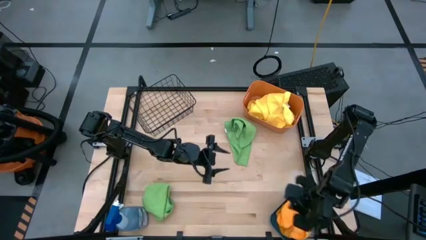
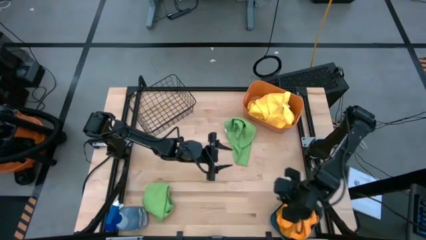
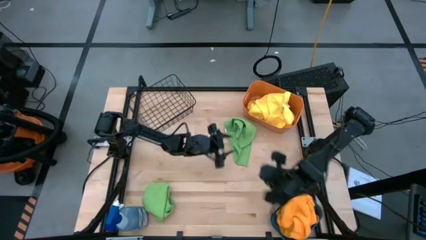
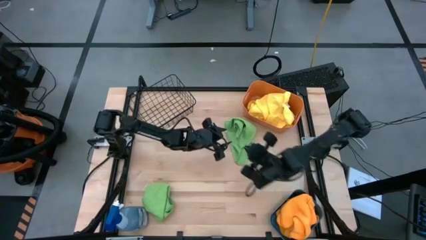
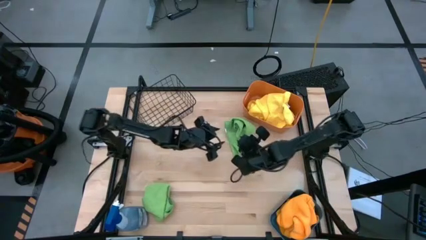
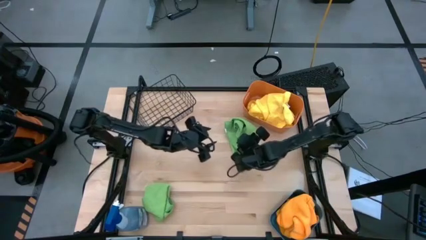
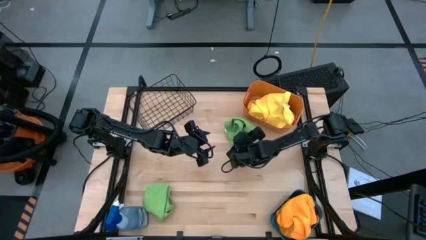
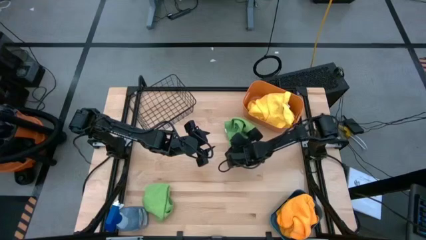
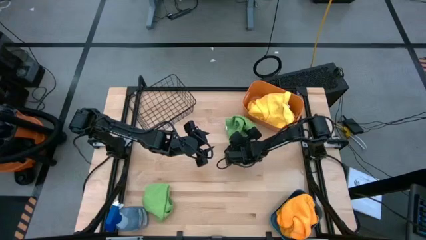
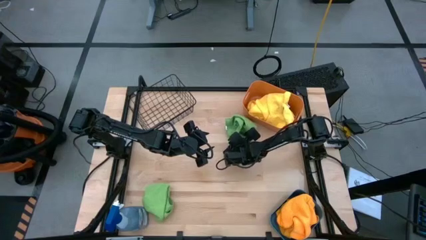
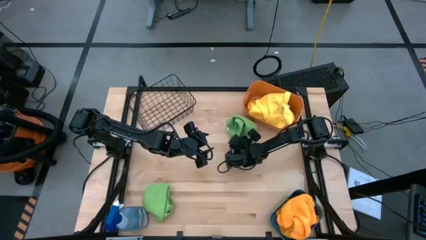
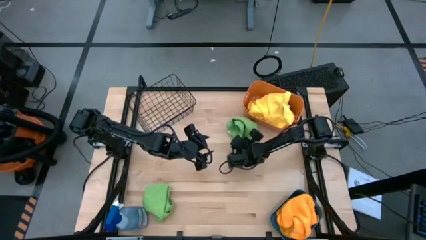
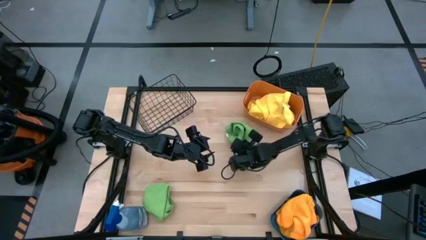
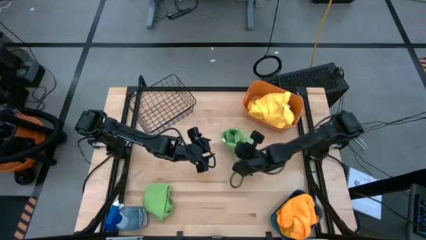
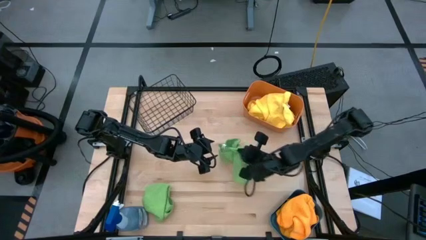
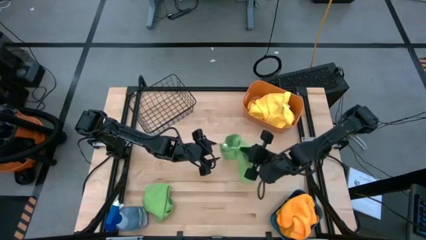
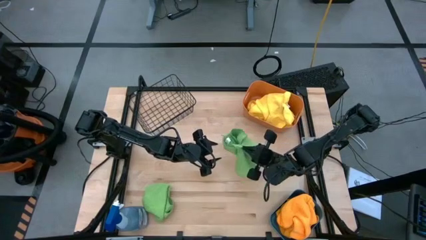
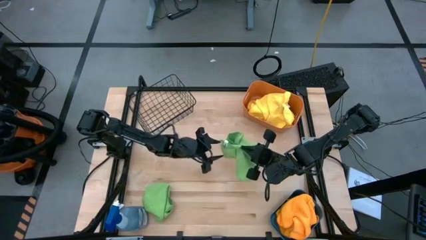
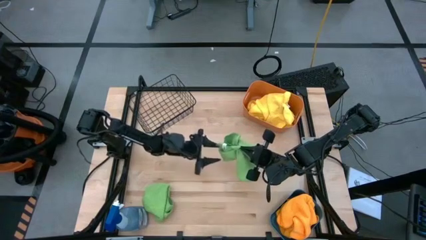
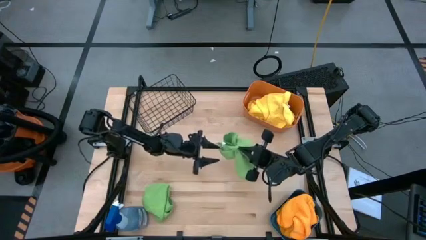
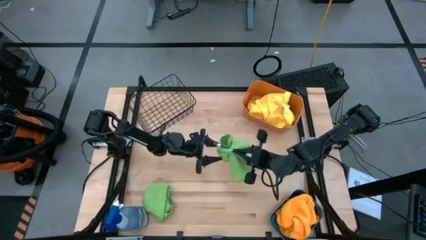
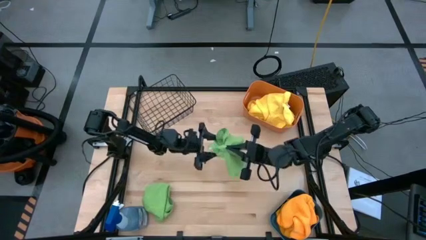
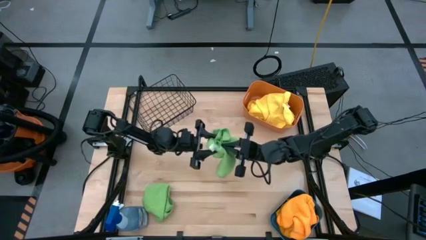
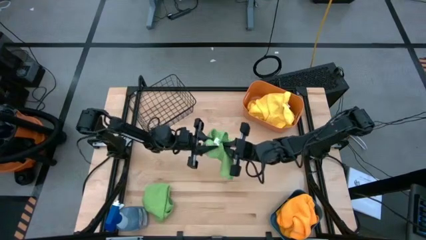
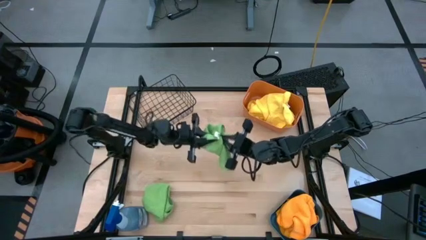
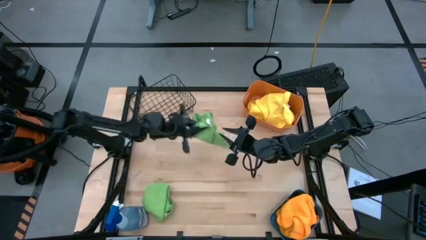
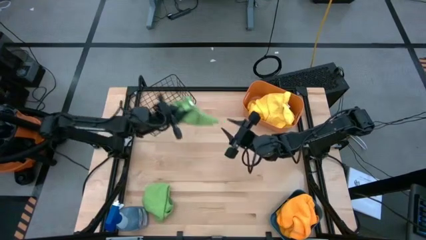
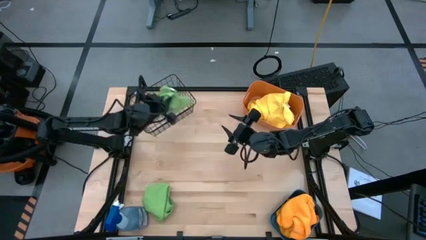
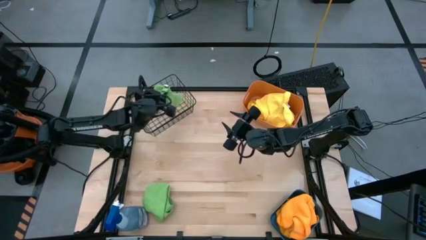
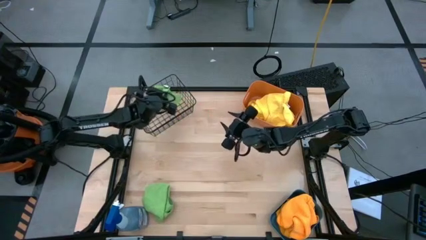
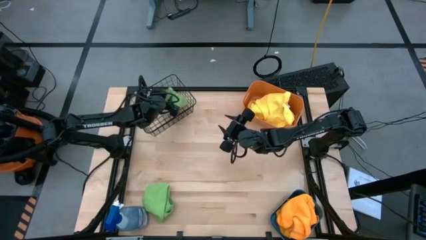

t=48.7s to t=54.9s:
Task: Sort microfiber towel by color & place in baskets
Put the top green microfiber cloth into the black wire basket

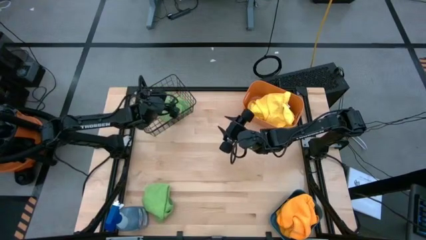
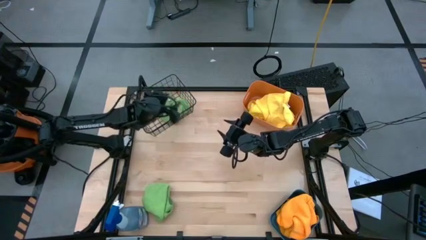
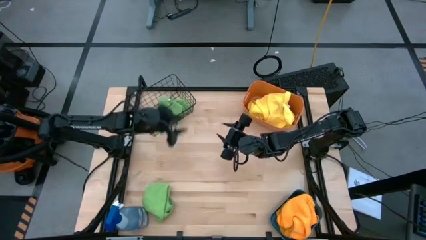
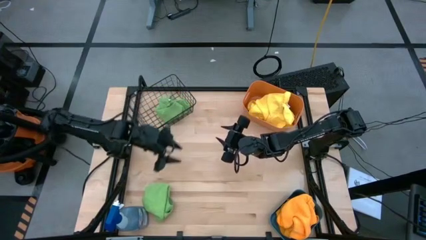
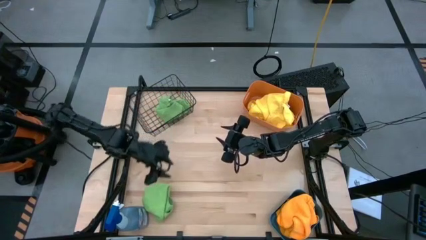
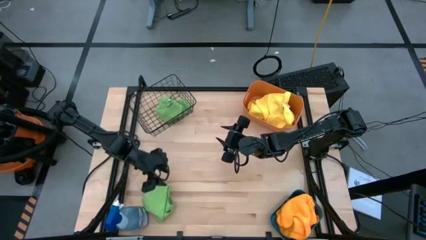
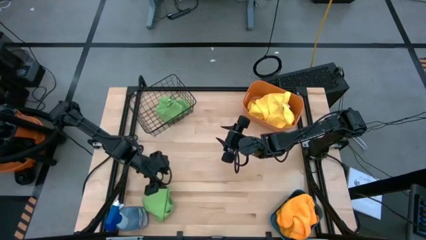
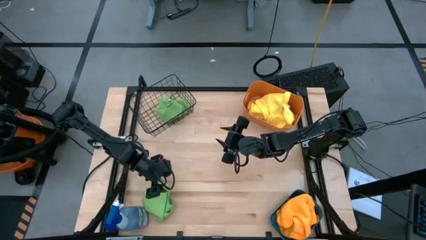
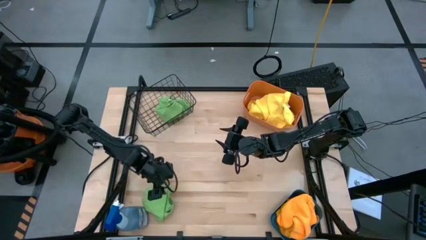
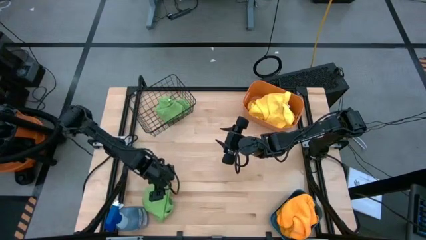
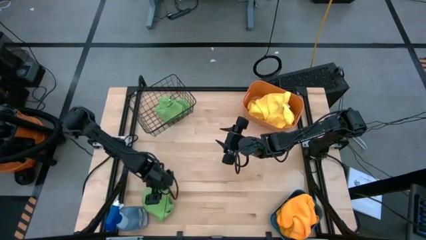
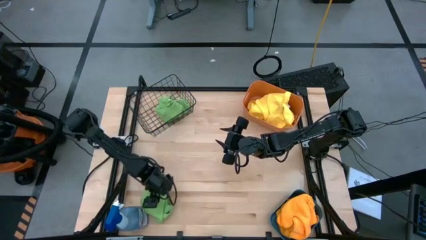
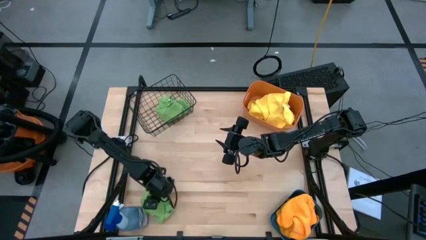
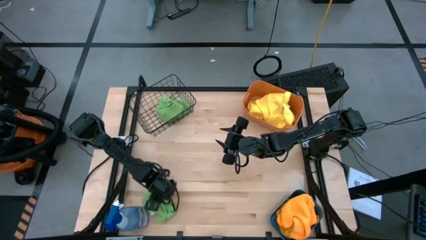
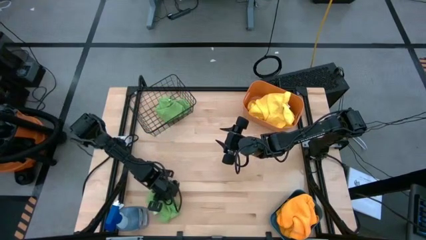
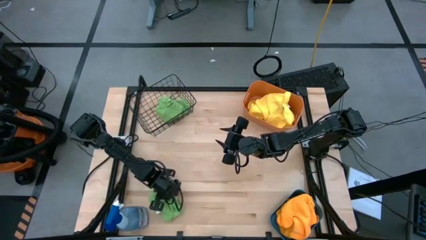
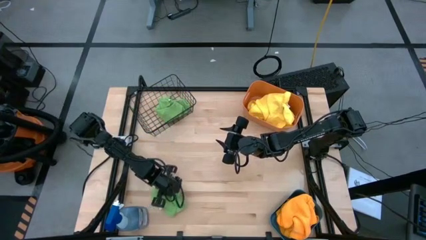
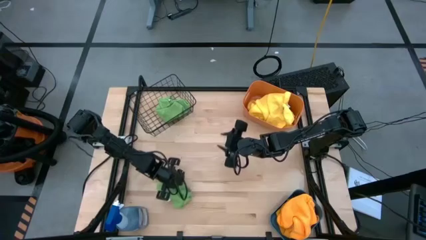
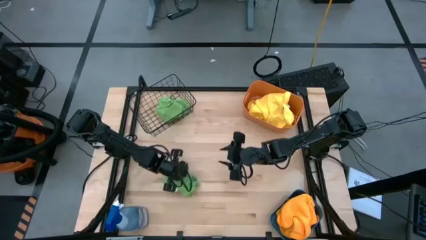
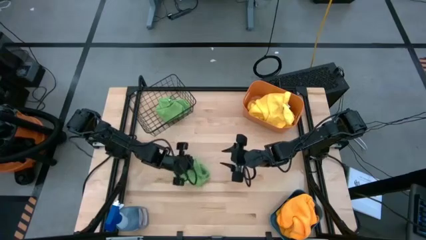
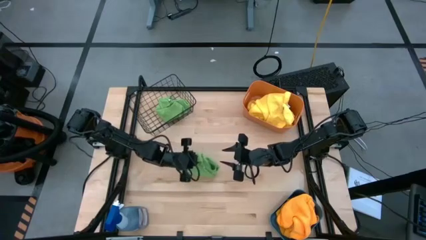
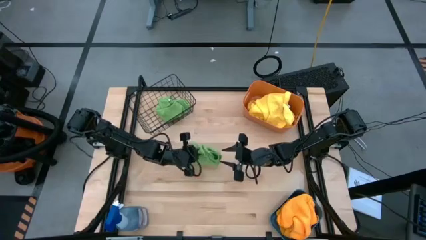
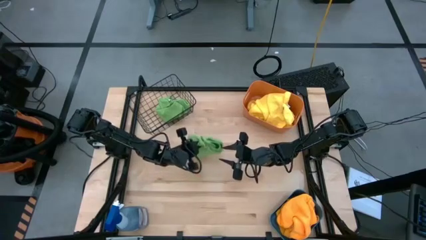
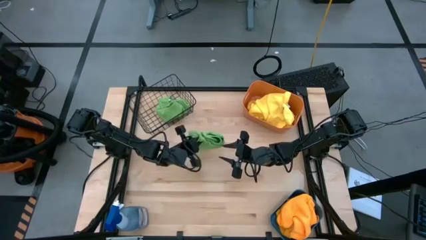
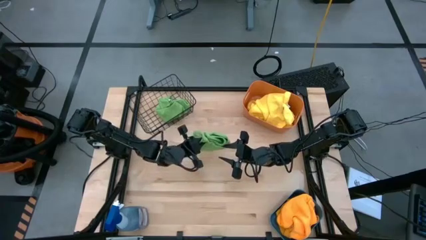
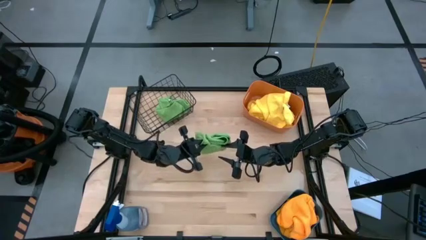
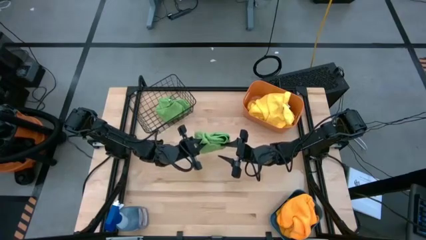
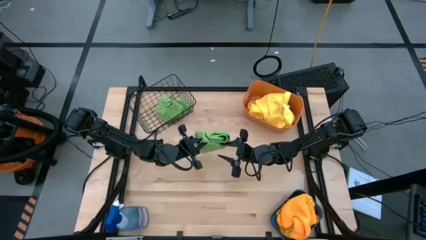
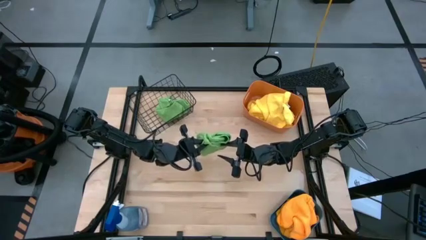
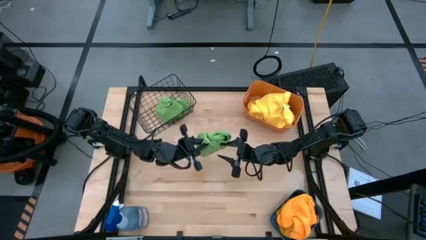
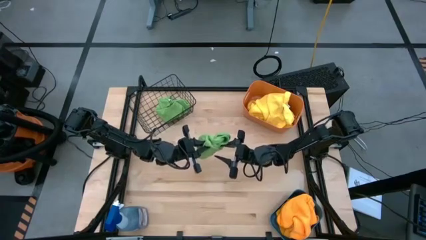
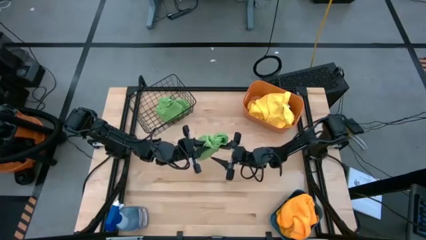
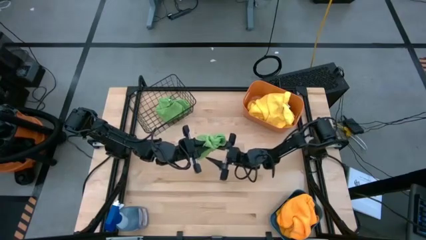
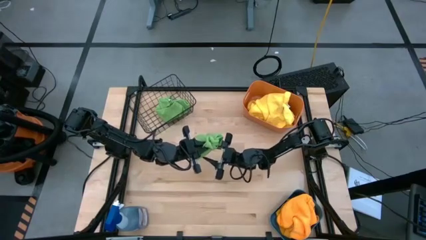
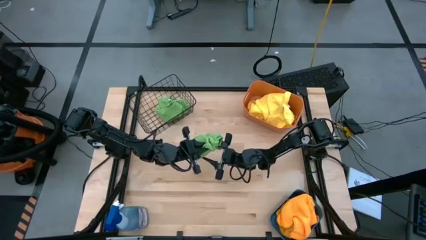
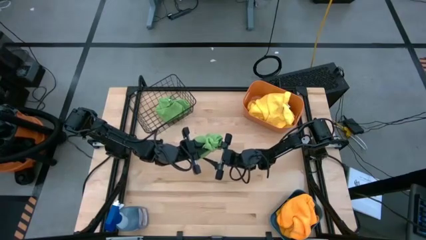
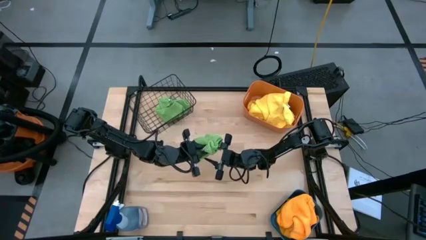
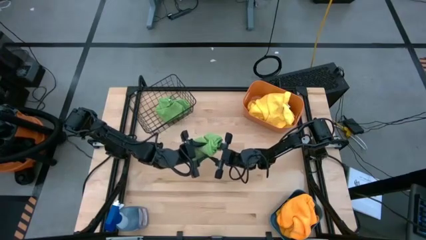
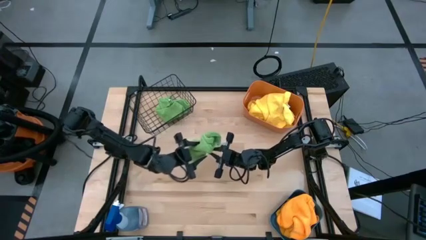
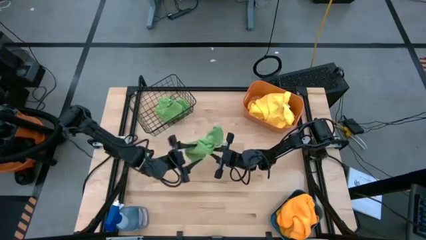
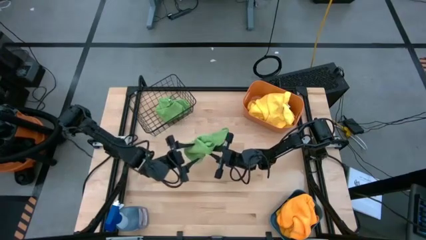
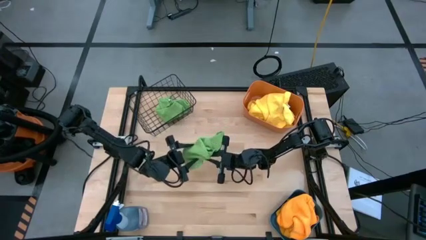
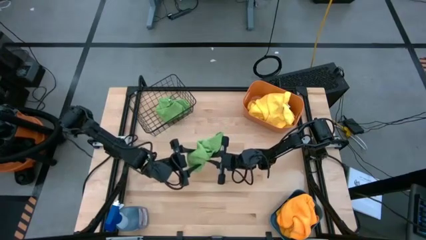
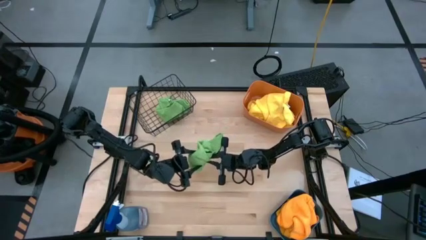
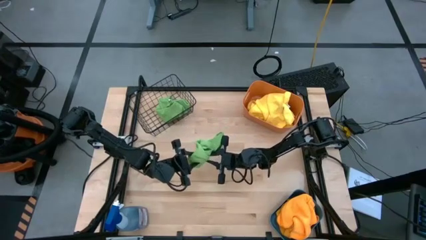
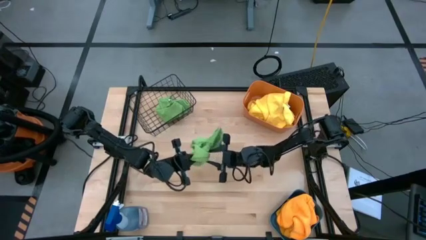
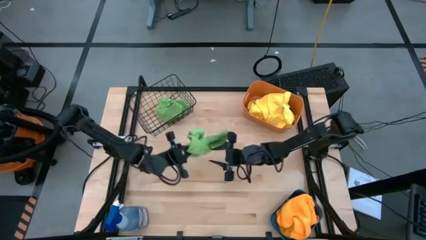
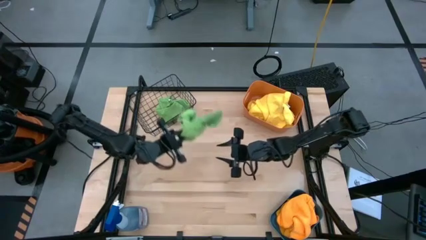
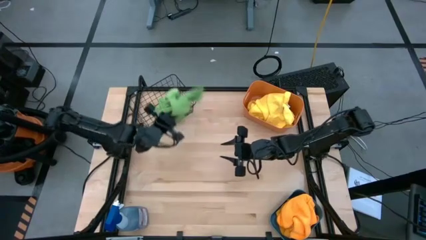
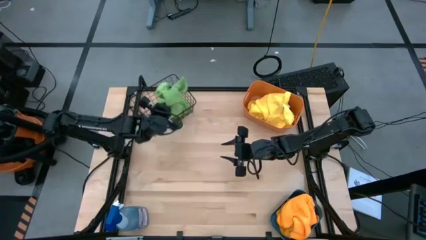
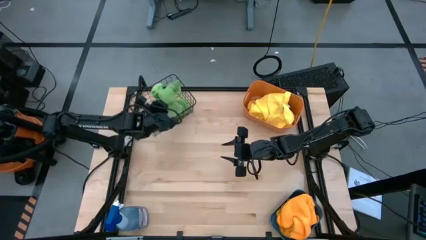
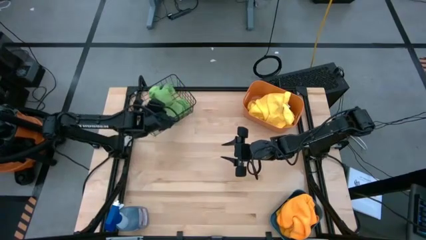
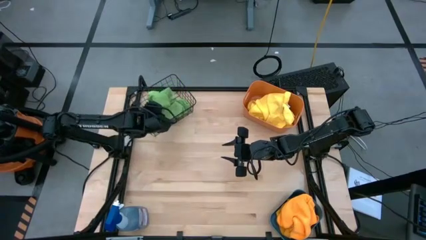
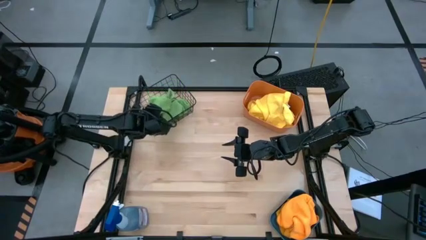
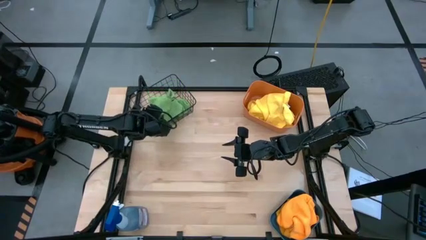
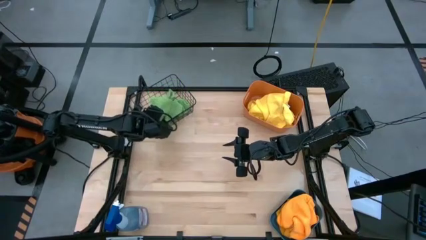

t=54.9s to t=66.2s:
Put the green microfiber cloth into the black wire basket
